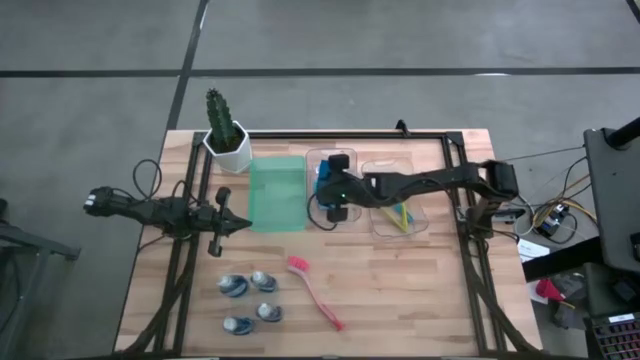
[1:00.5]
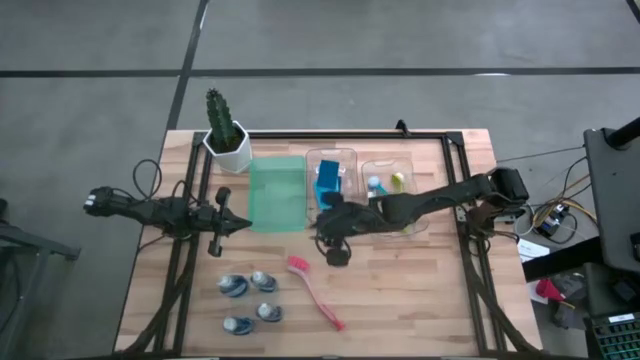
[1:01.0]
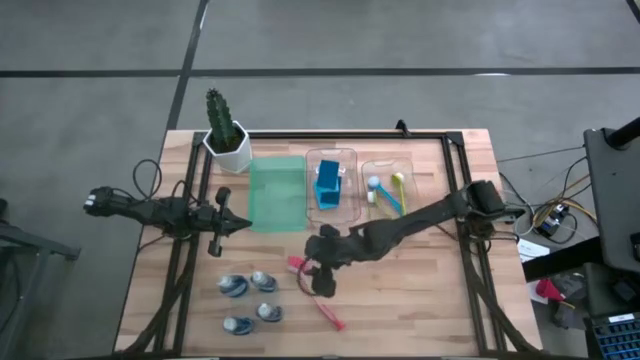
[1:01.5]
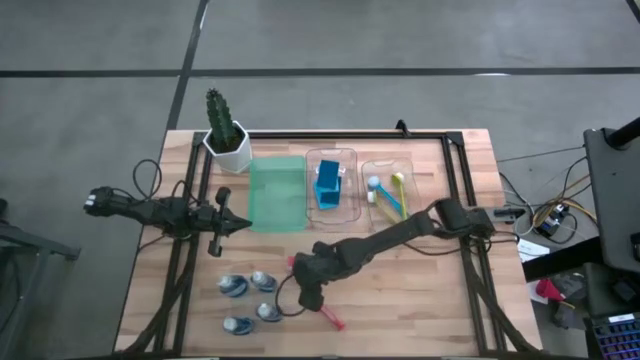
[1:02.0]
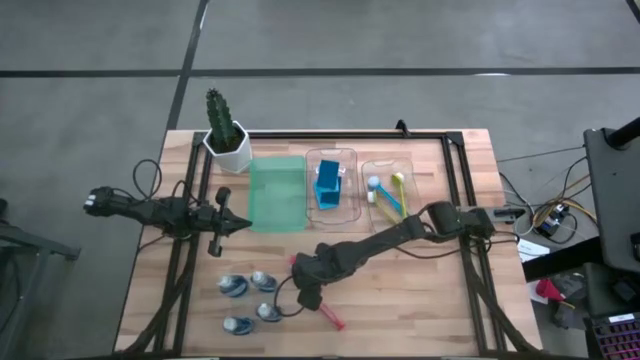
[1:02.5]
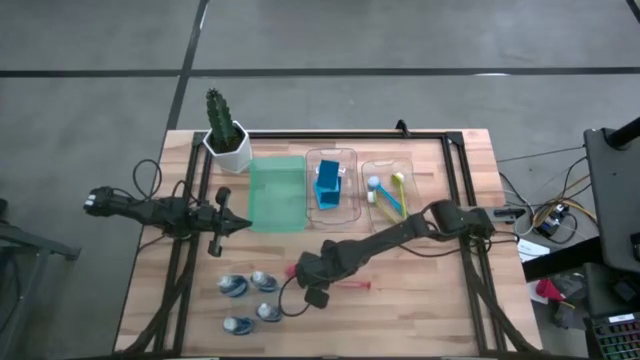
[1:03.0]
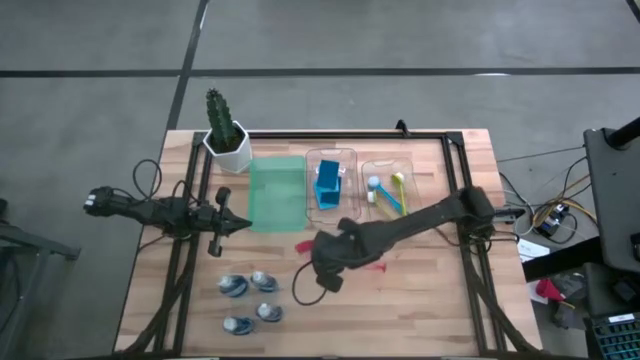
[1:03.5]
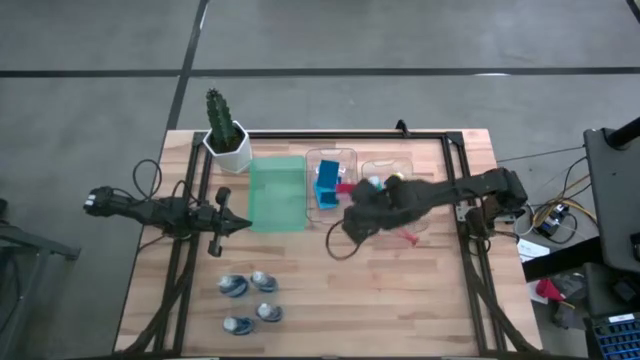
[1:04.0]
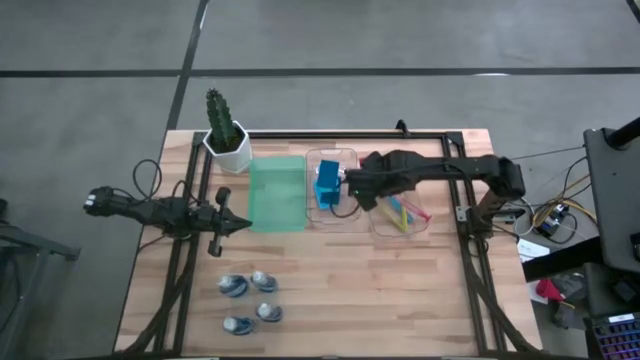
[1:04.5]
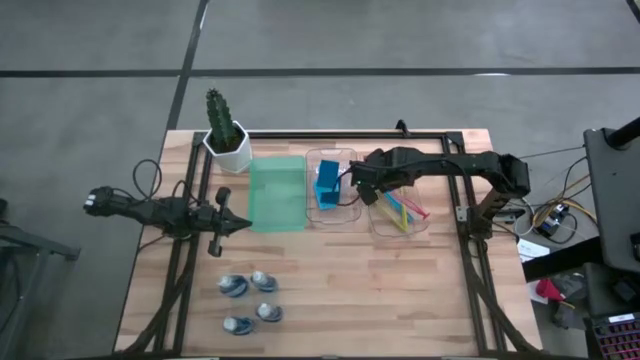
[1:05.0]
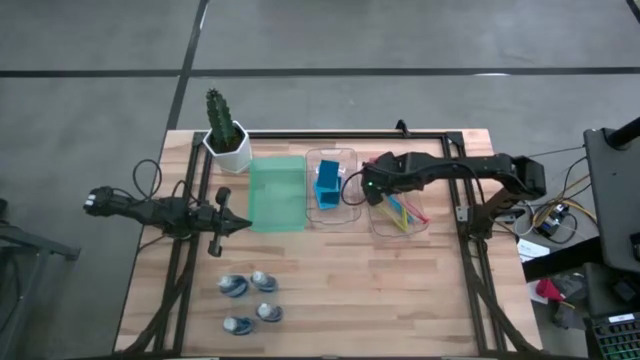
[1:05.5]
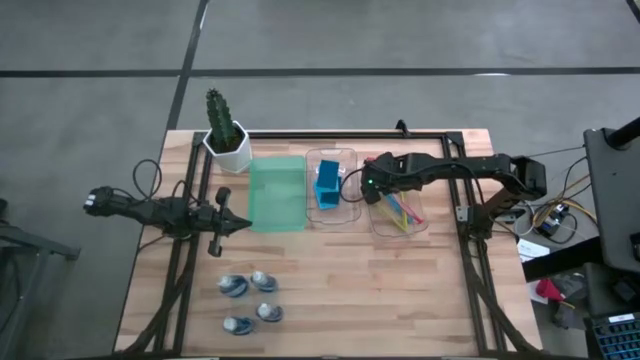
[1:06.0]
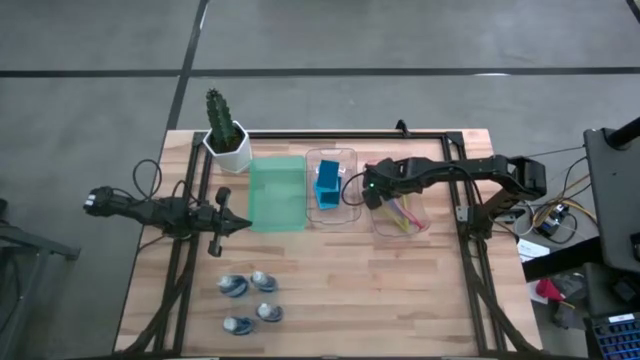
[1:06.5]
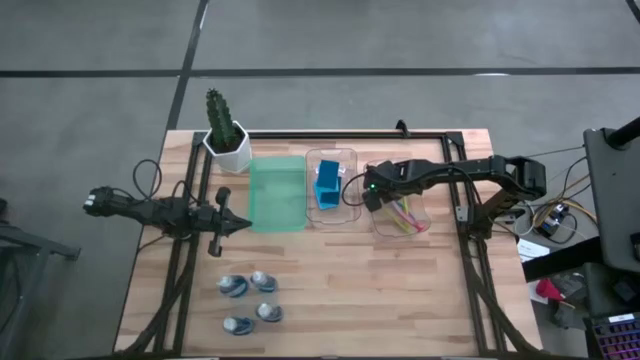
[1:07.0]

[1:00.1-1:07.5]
Task: Pick & Place Kitchen Sink Supplies
Put the red dish brush into the right transparent bin

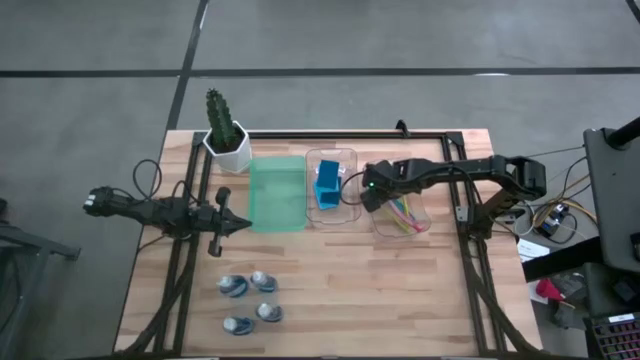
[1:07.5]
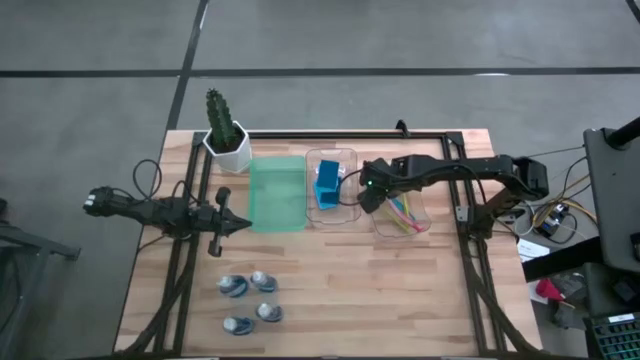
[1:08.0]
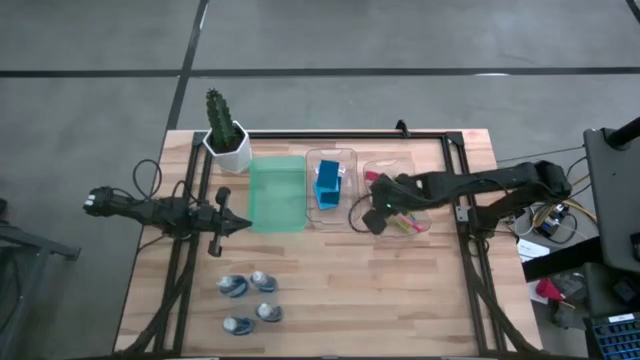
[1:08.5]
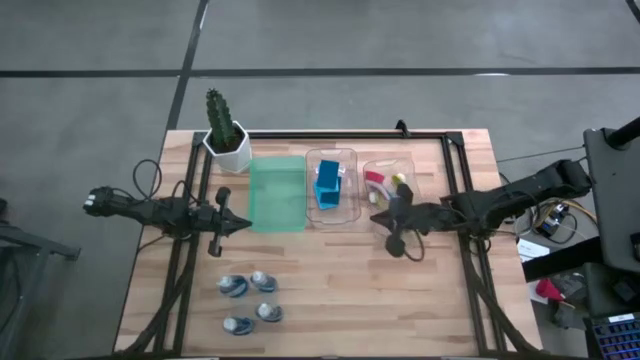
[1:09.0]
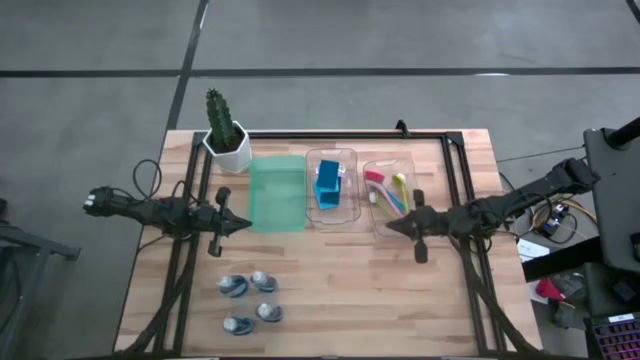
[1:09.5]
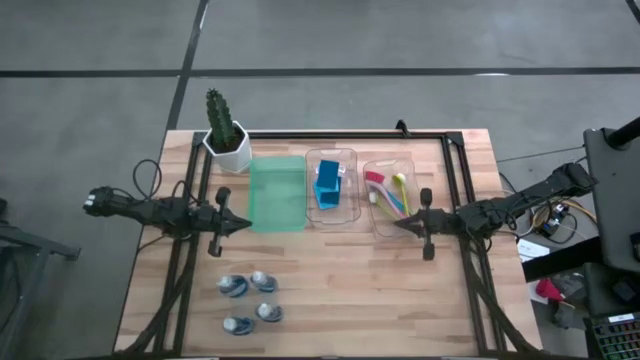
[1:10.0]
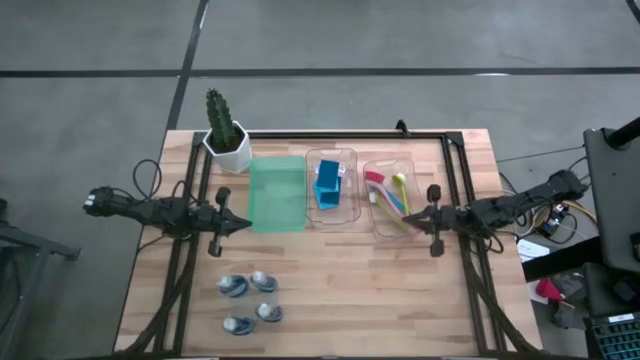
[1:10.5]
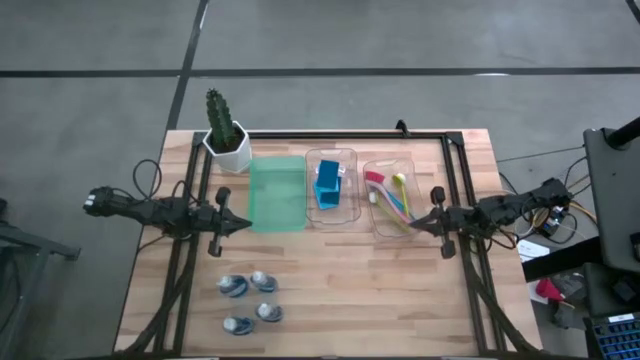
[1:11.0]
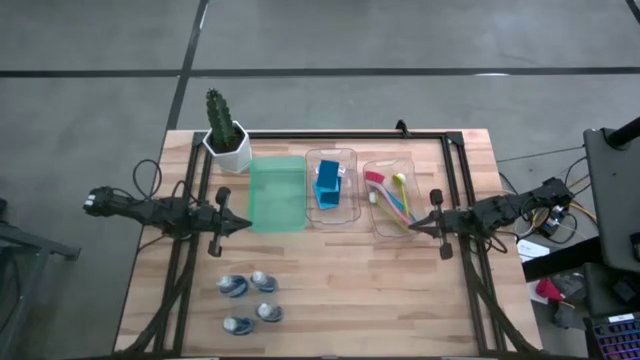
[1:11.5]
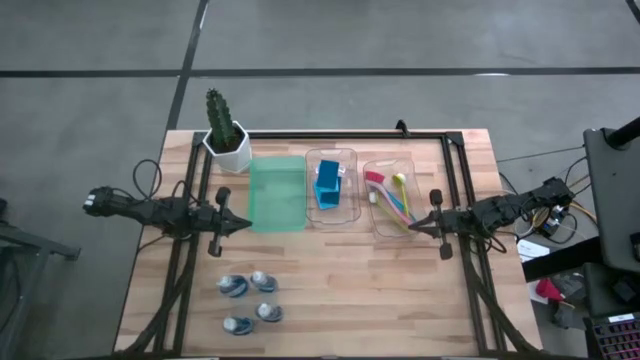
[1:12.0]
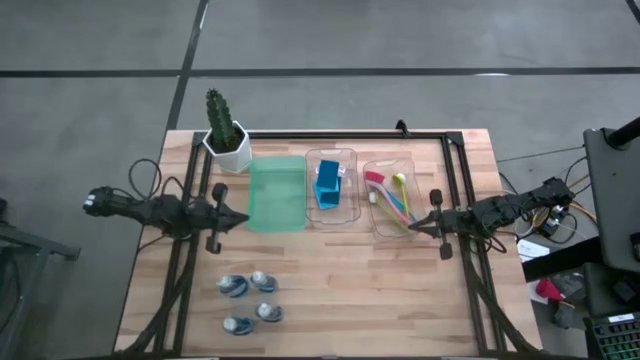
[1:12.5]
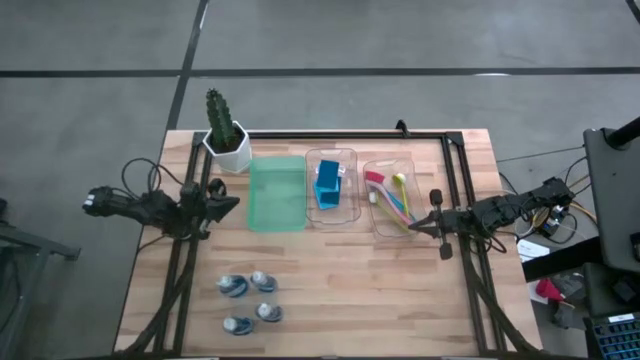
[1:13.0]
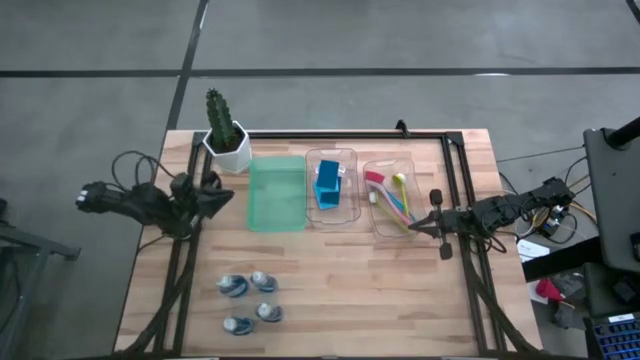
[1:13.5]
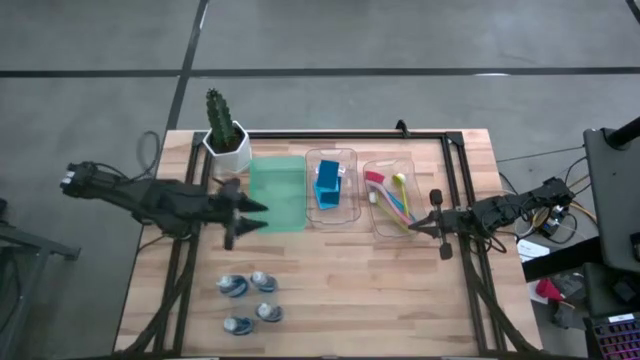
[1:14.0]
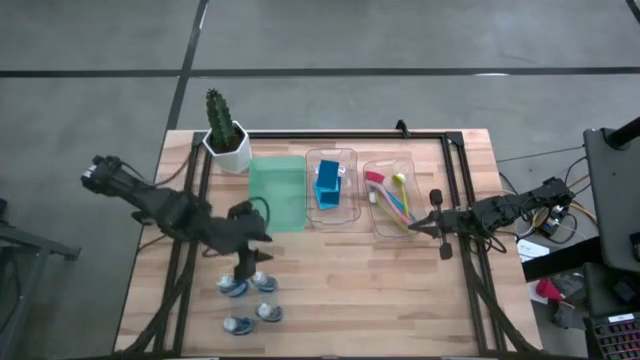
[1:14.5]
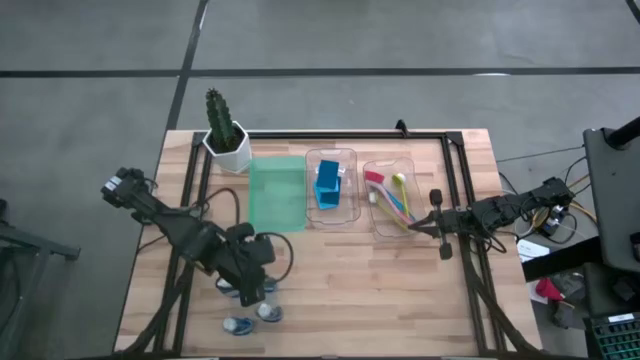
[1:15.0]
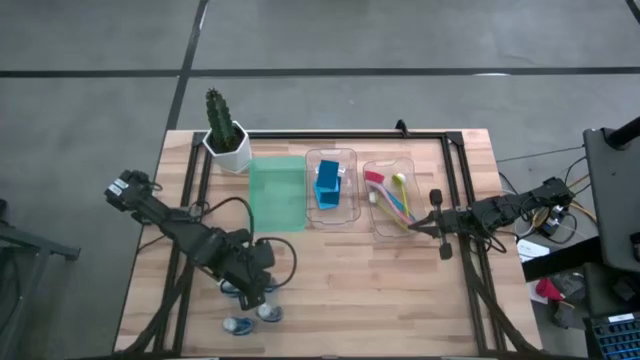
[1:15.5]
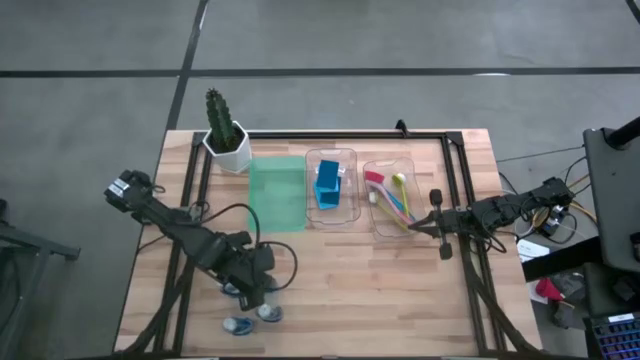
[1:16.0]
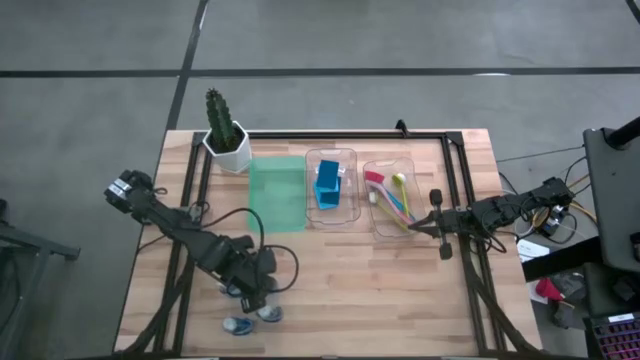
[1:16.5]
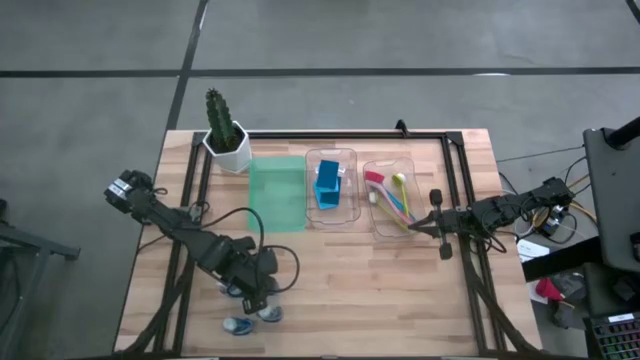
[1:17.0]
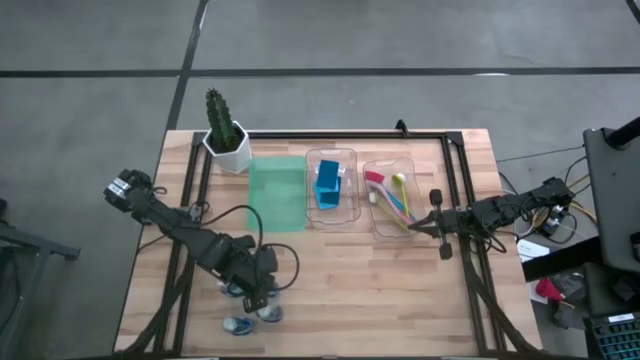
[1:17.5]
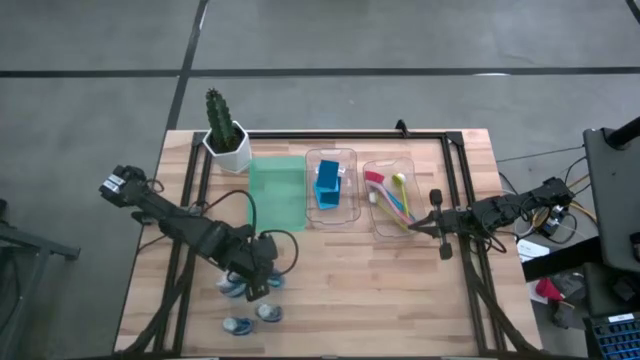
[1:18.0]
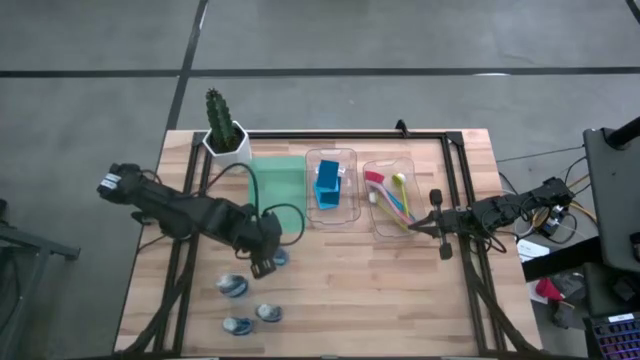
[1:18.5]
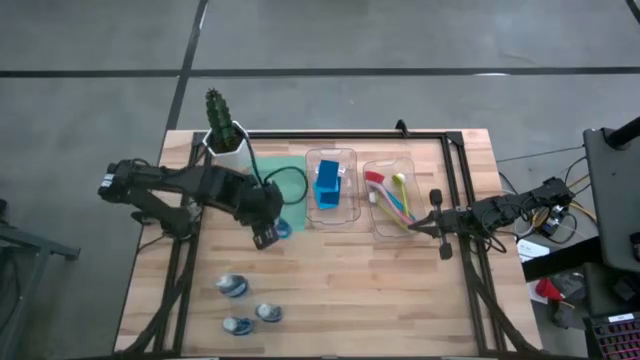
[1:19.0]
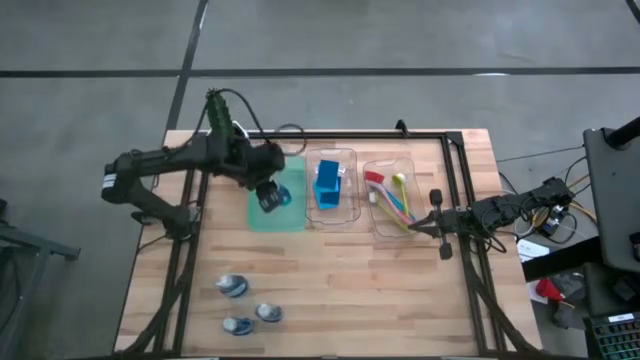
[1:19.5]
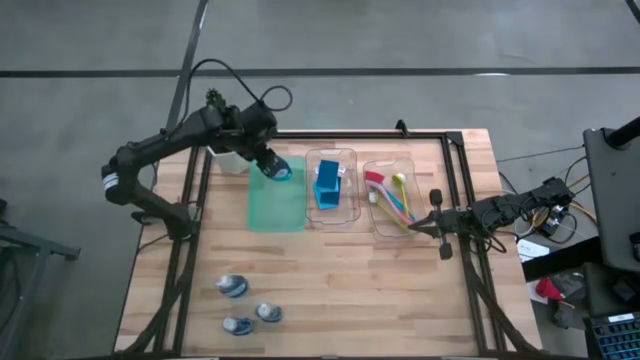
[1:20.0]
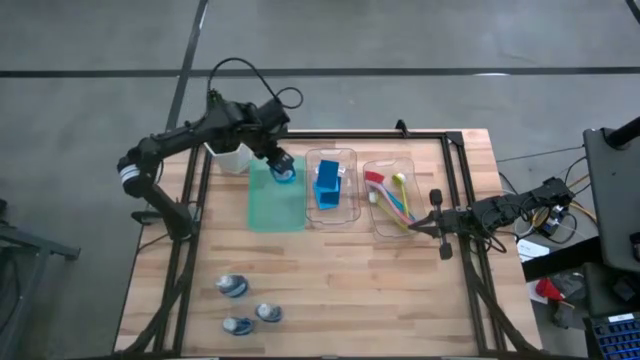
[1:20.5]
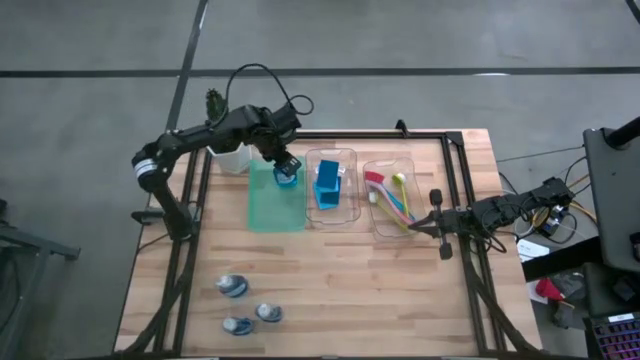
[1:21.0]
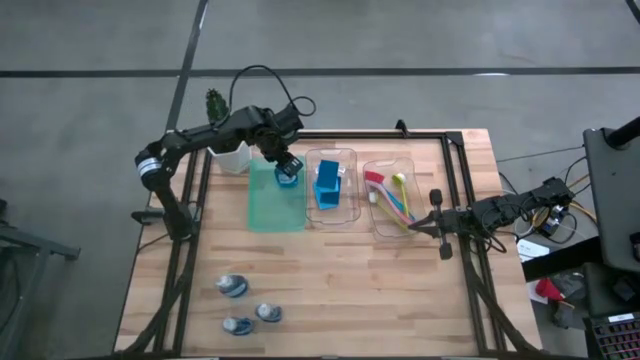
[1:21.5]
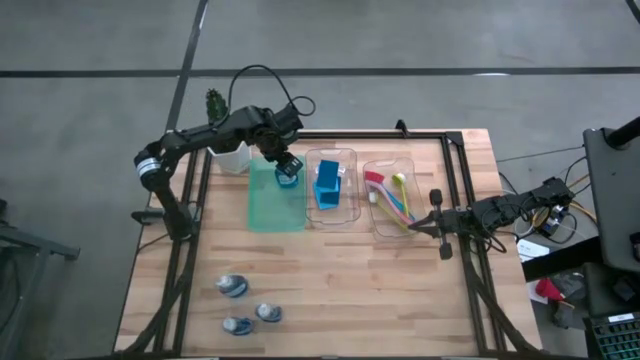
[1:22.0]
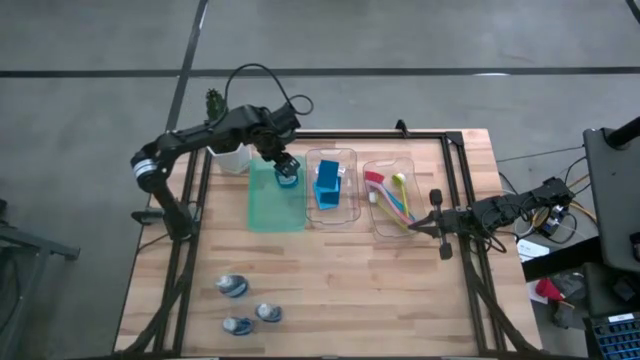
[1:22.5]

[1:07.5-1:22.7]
Put the blue liquid soap into the green bin
